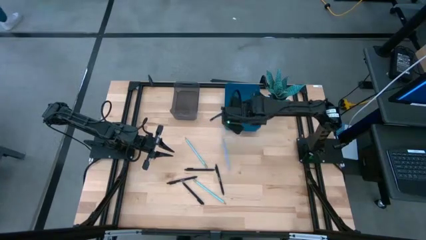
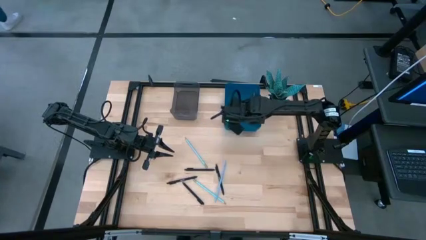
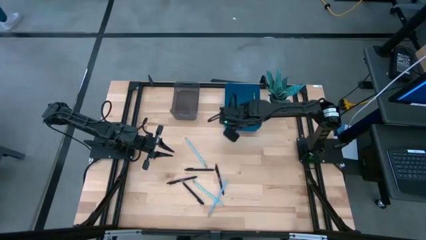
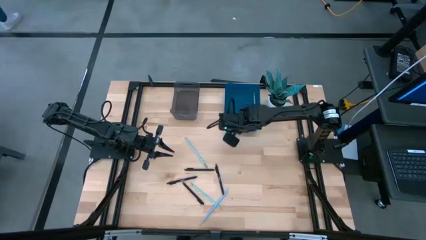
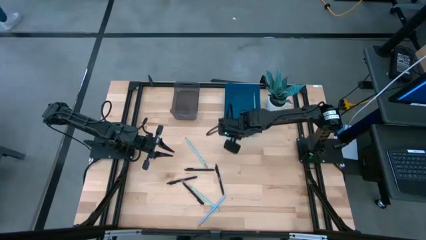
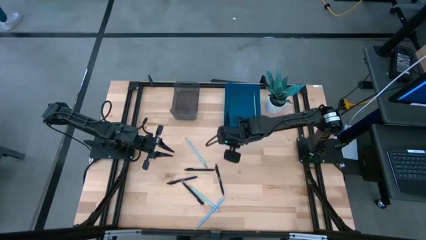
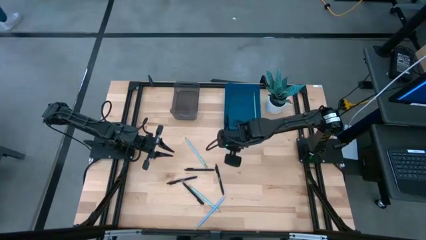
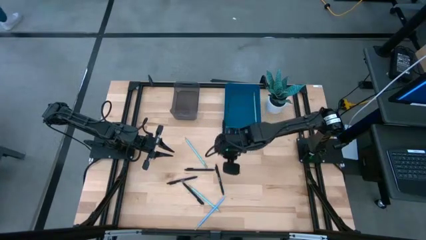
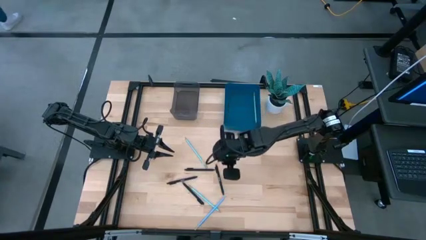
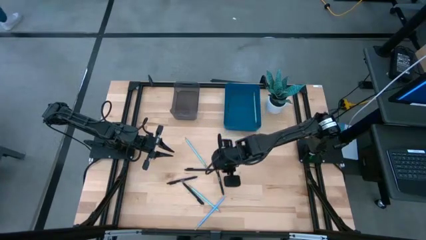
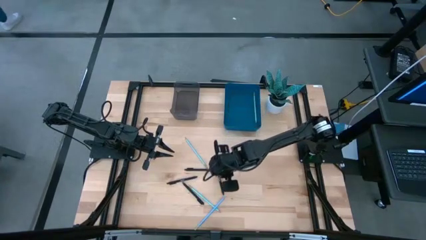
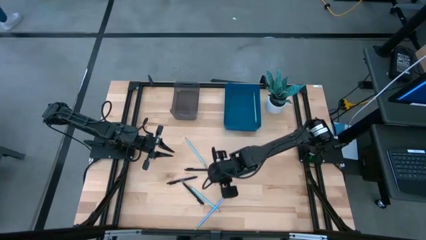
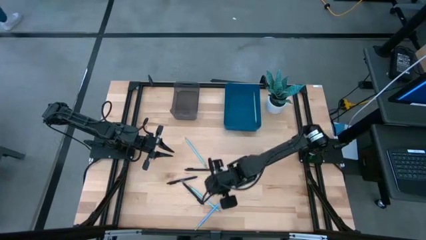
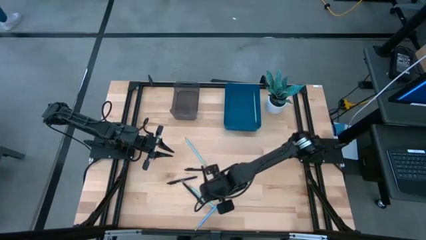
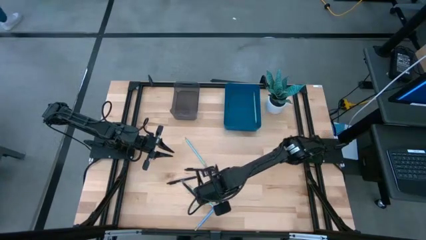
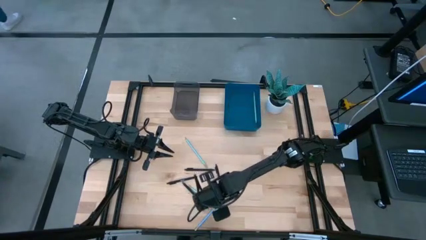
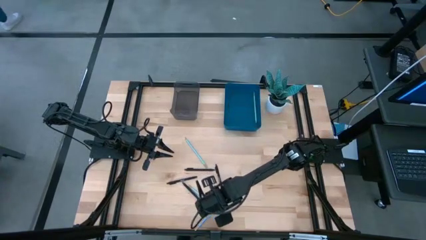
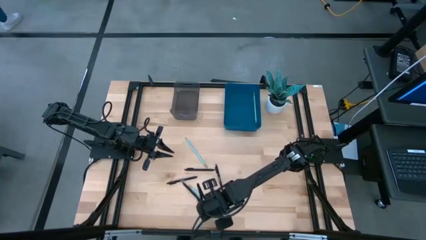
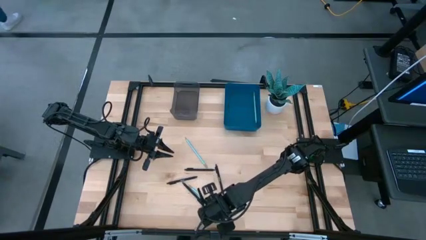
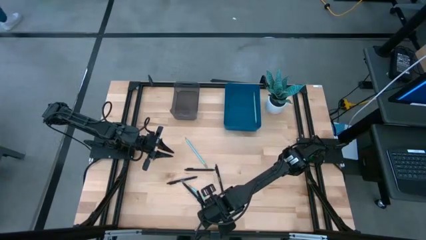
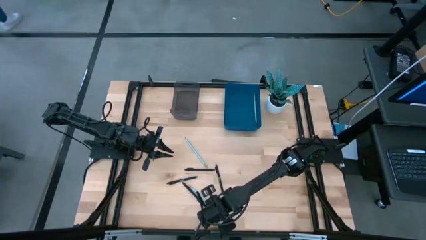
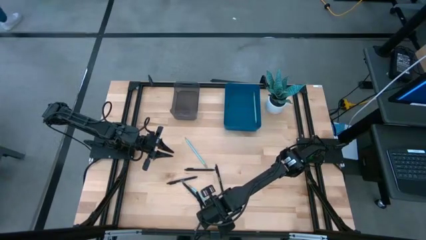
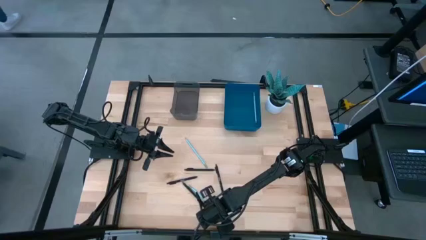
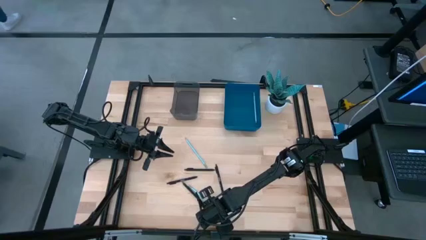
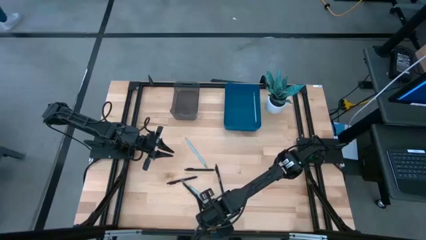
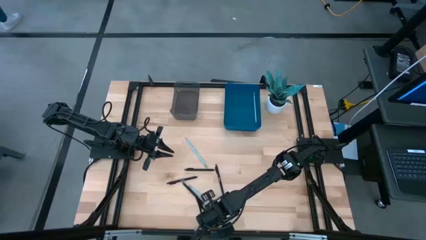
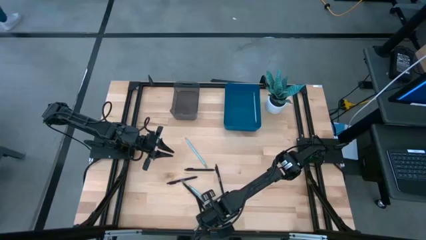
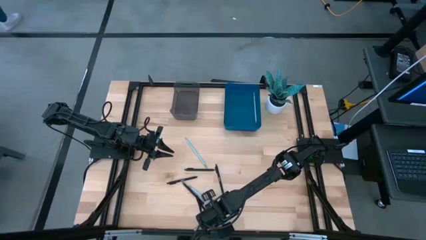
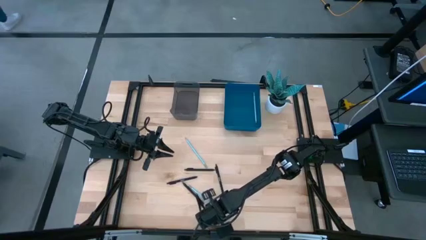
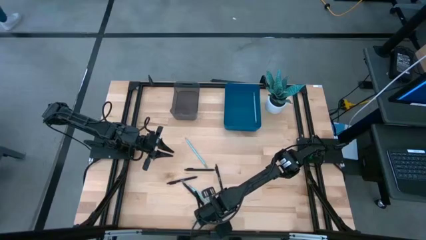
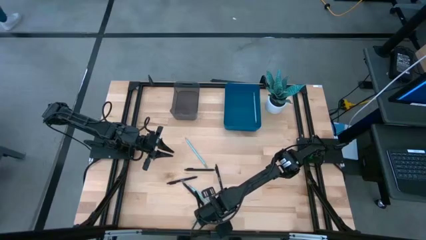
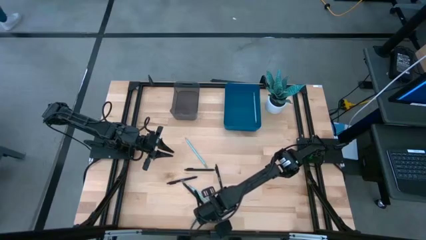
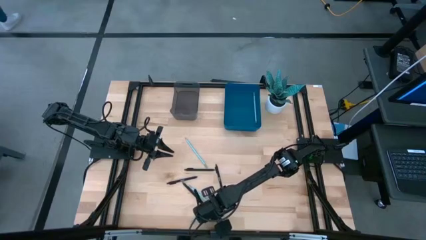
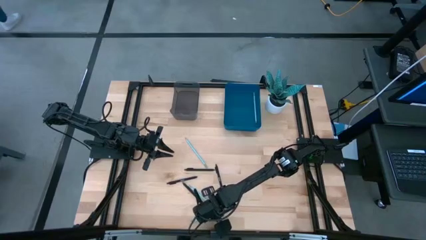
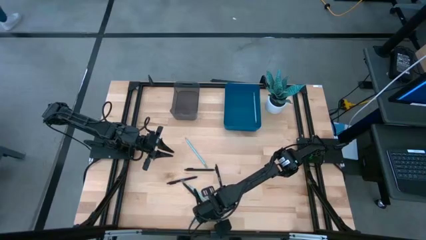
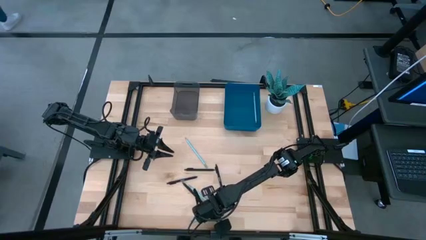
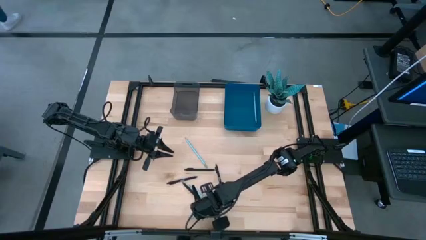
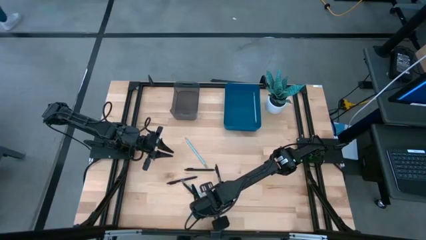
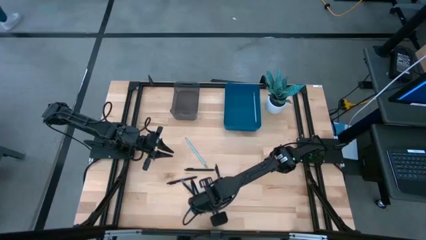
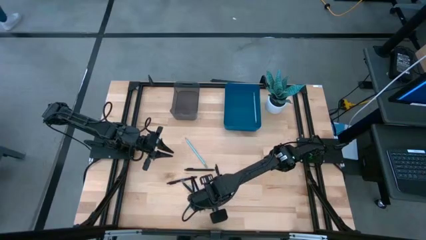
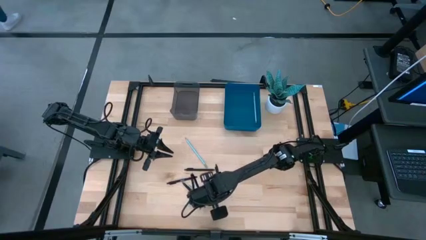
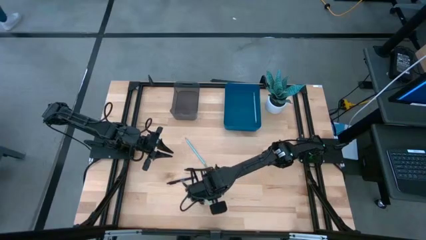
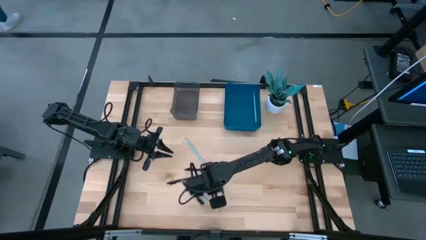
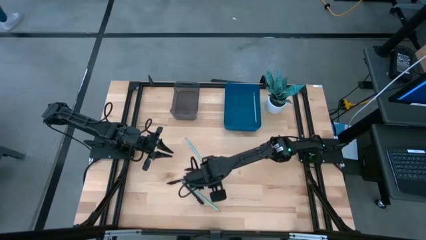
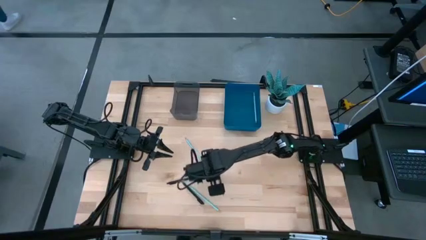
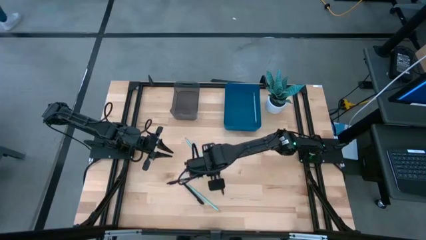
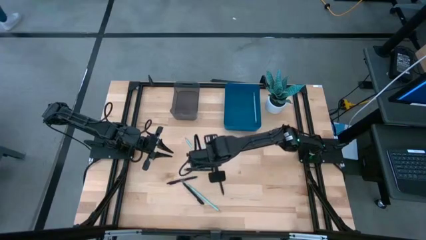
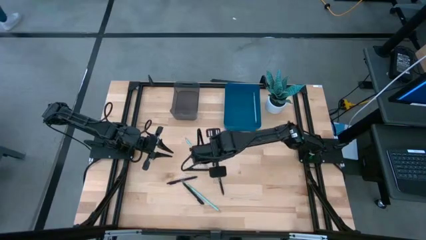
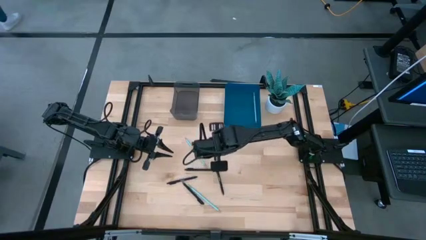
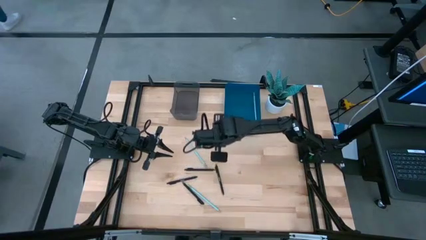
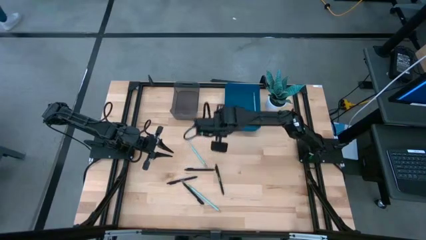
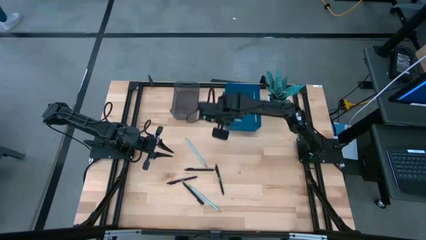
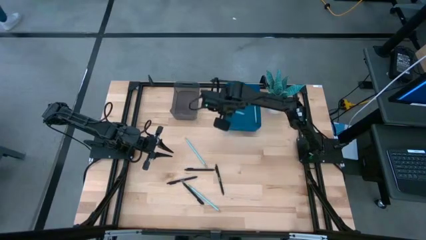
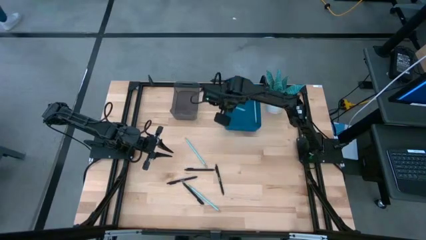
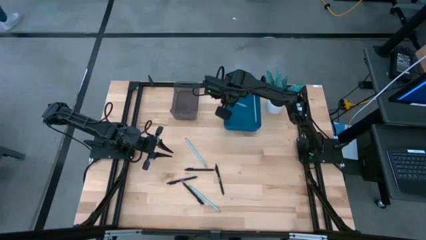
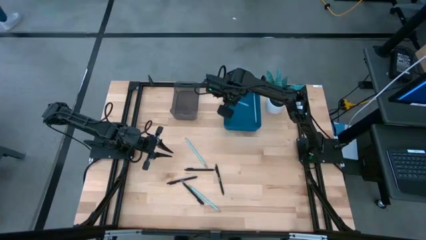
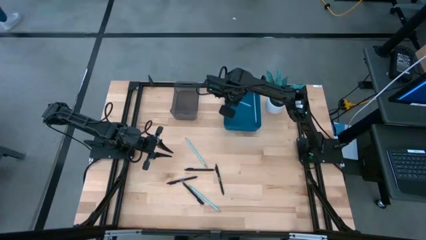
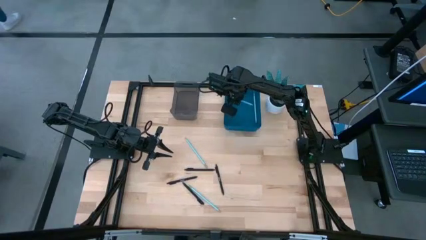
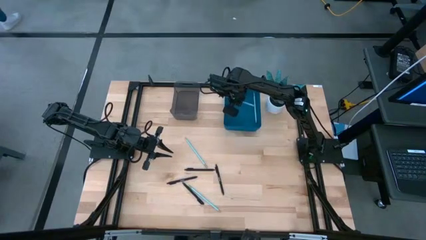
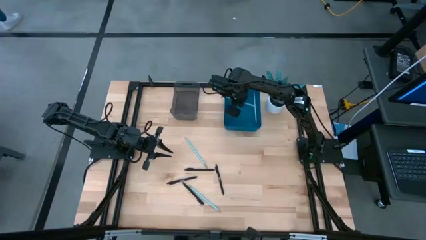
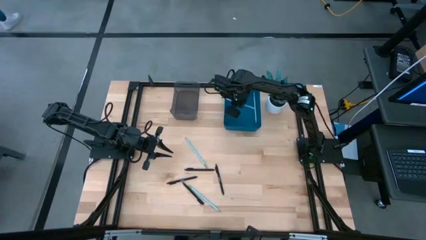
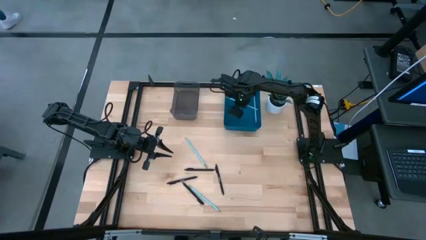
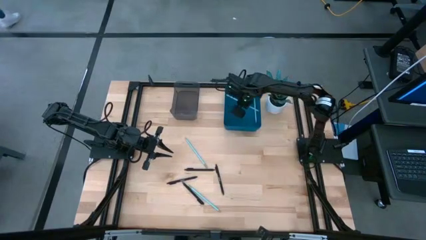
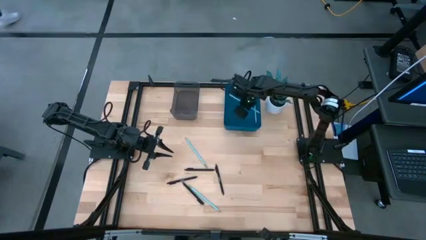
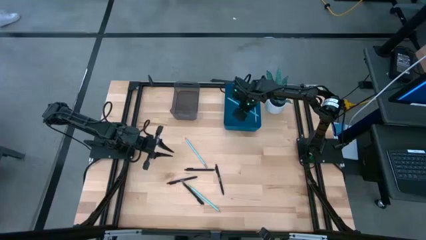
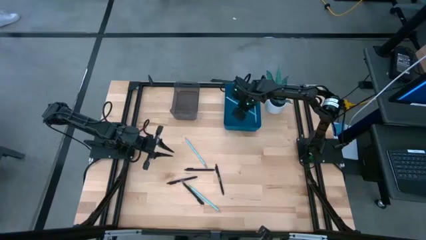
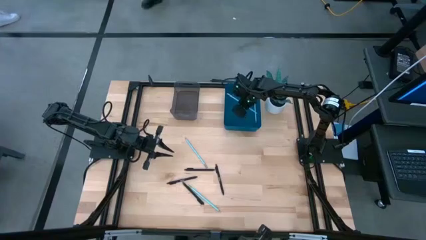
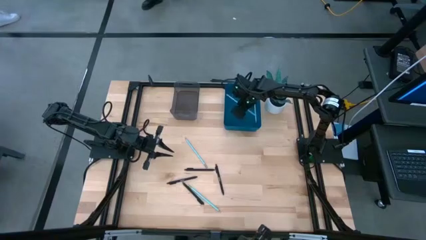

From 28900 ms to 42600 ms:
Task: Sort pens & pencils
Put the blue pencil into the blue bin
